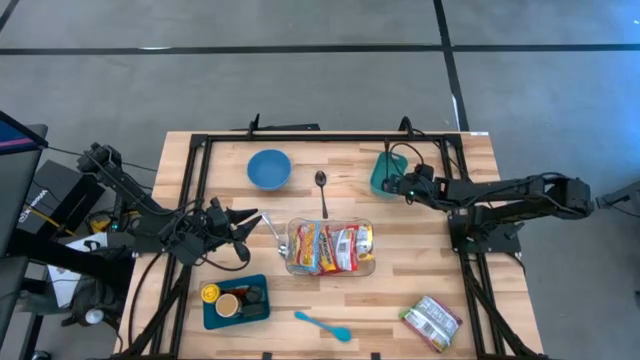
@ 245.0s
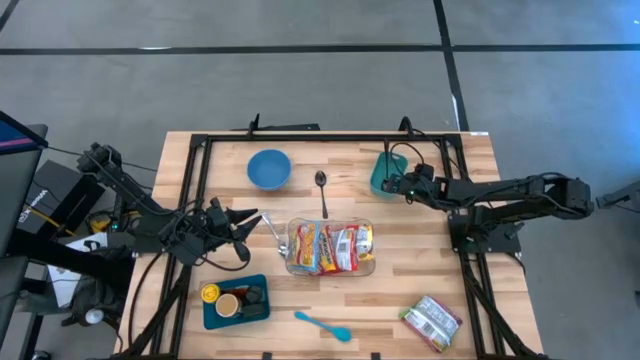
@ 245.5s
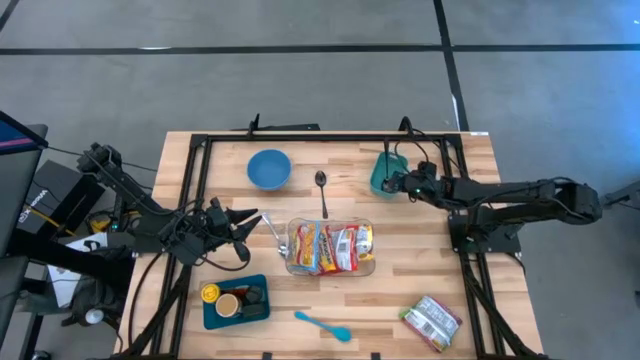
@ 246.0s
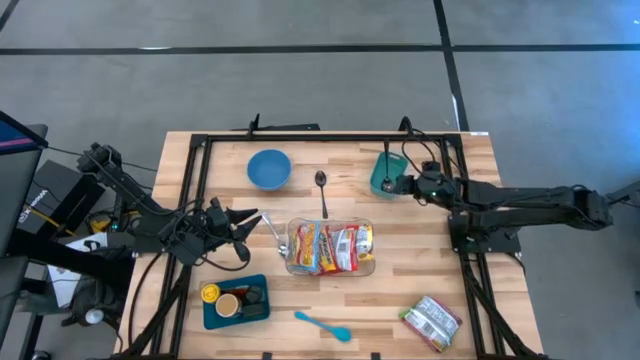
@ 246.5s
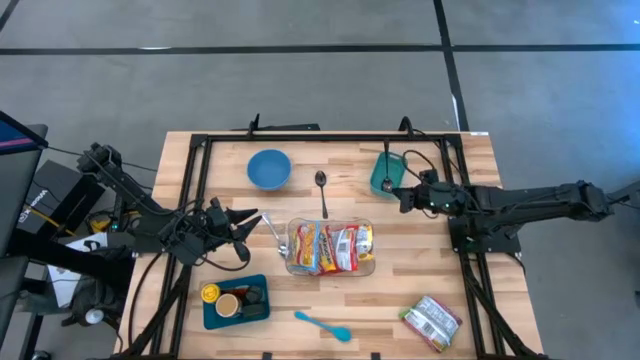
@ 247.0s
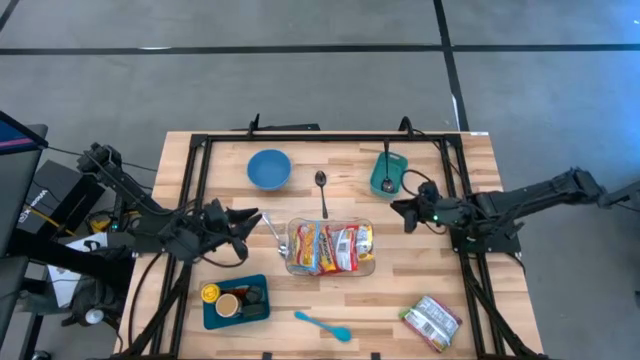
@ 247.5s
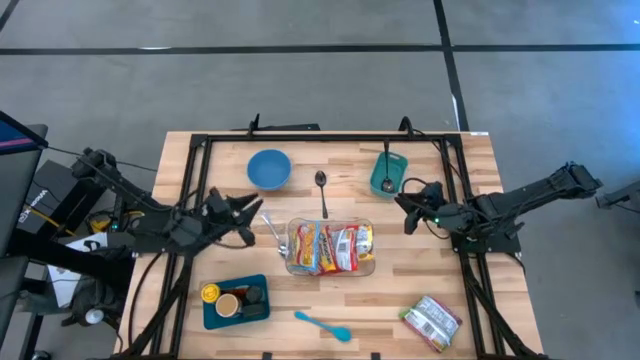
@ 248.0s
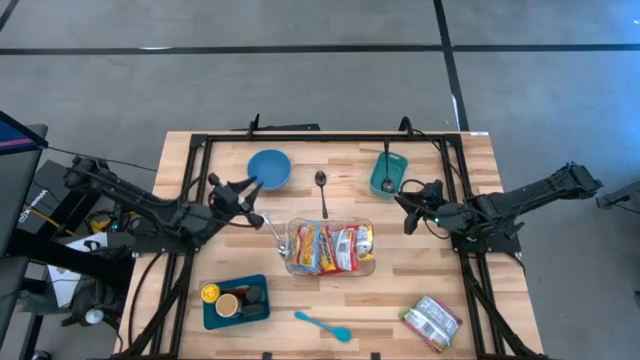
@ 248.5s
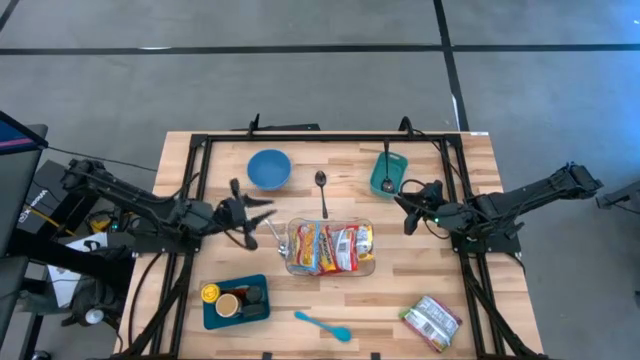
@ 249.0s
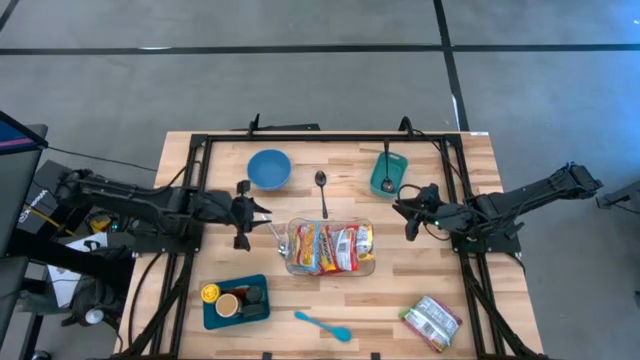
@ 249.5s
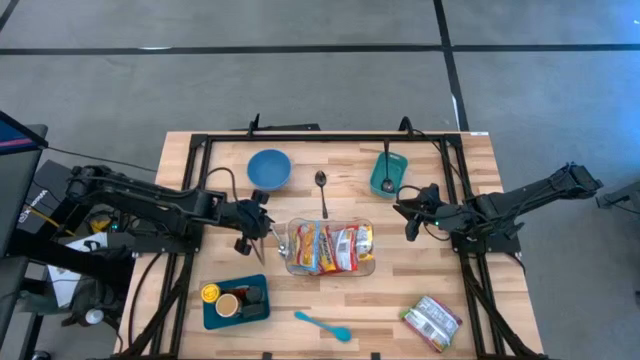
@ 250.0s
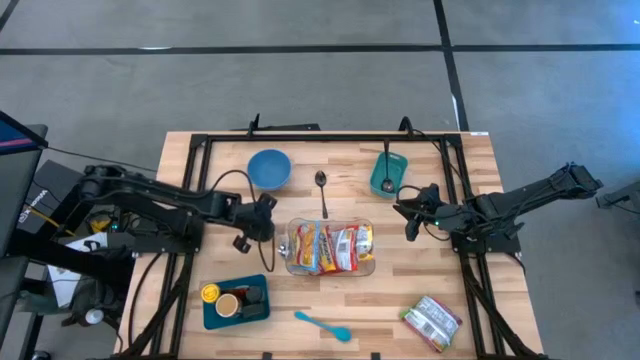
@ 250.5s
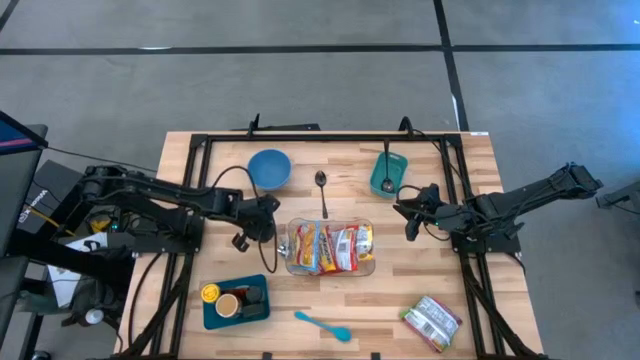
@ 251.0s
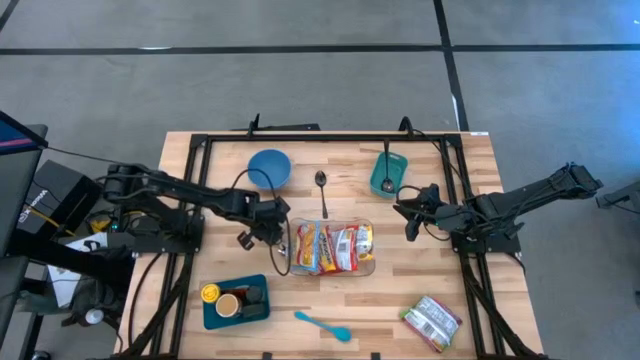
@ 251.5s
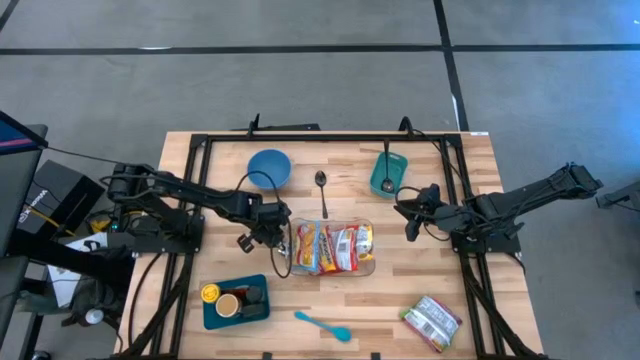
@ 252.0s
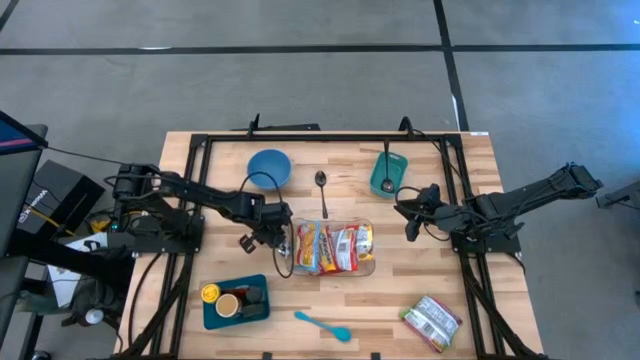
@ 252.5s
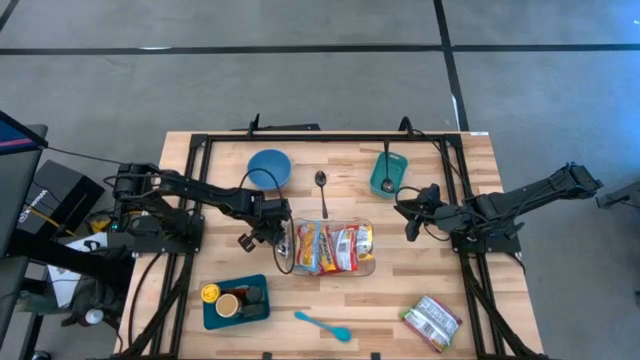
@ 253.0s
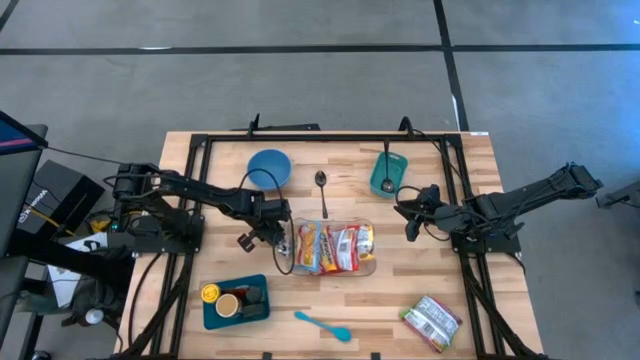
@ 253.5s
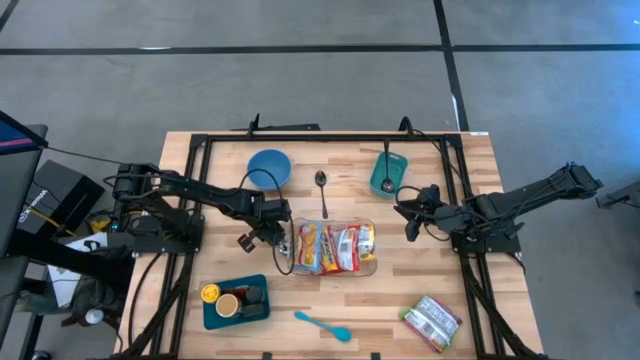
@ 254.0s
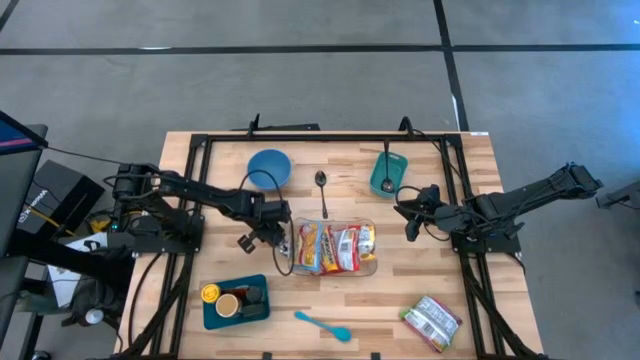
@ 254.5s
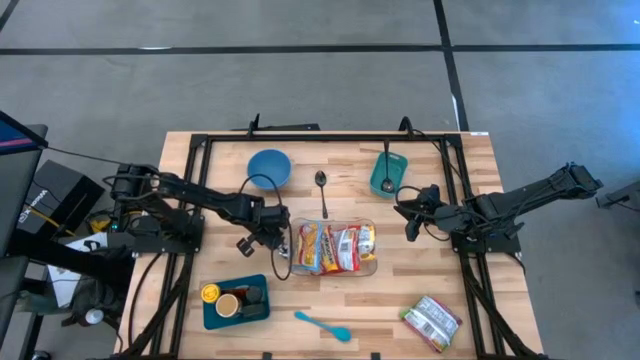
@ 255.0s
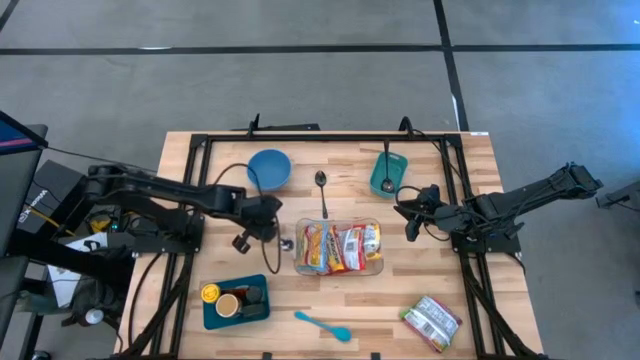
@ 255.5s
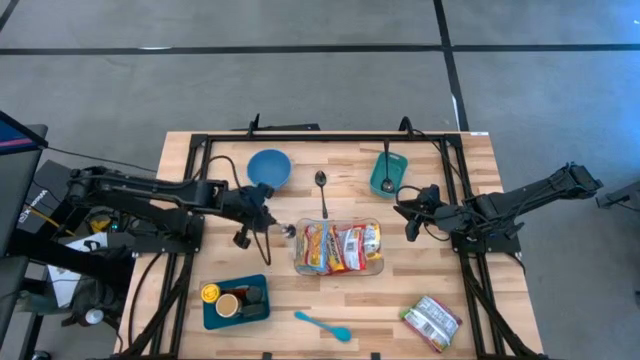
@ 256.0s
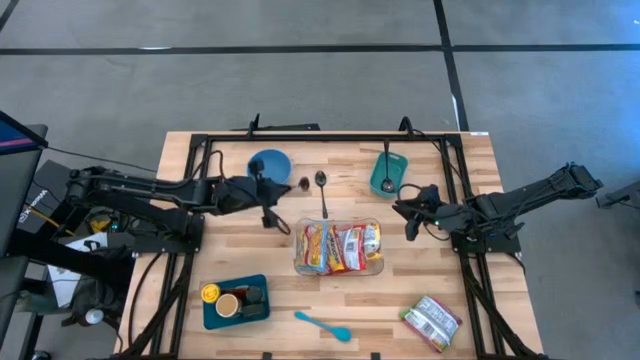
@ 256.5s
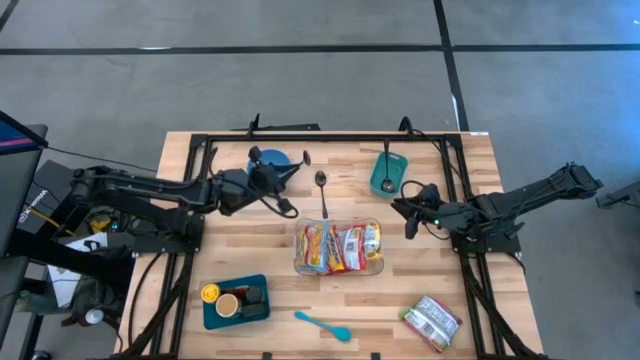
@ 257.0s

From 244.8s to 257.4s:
Task: Pick & Place Food Item
Put the silver spoon into the blue bin

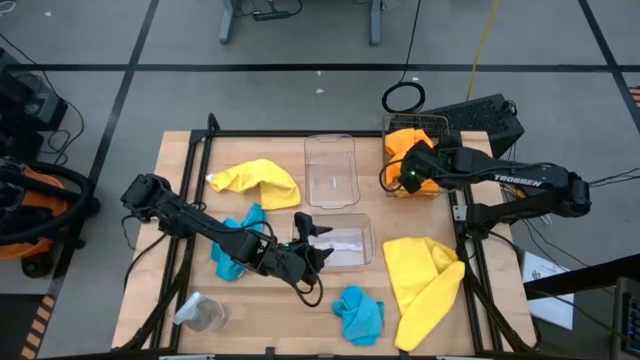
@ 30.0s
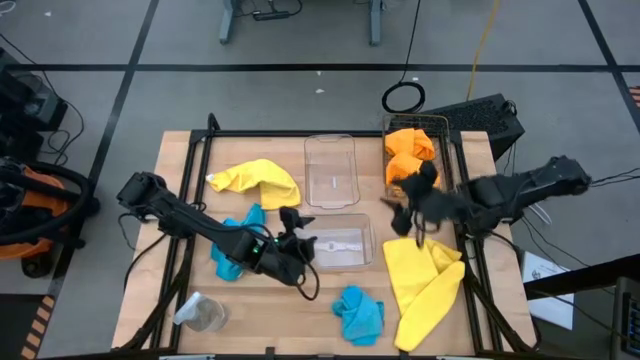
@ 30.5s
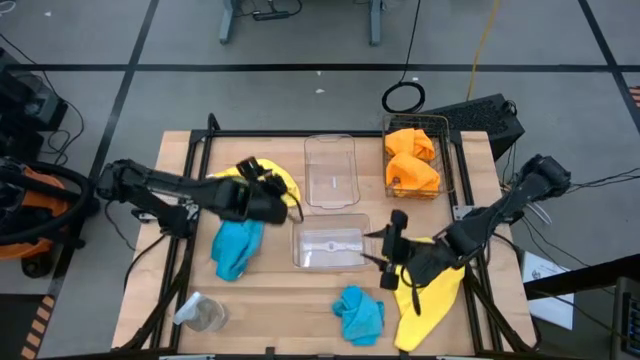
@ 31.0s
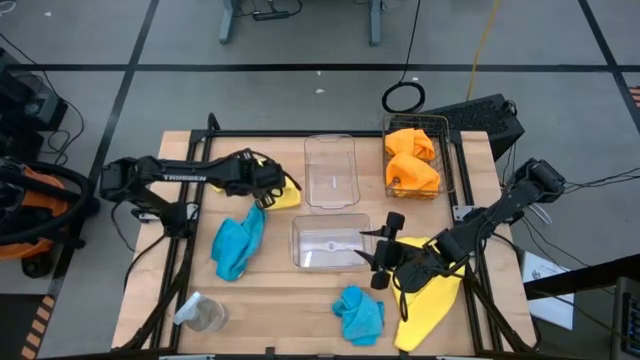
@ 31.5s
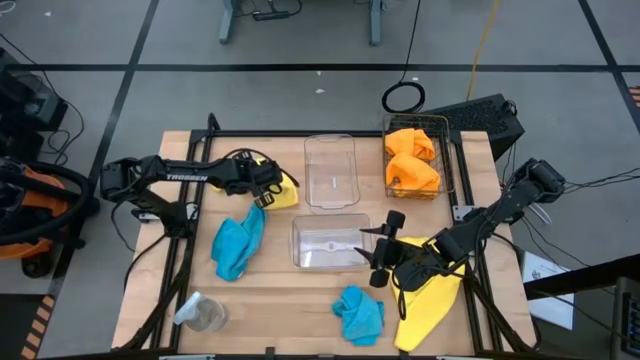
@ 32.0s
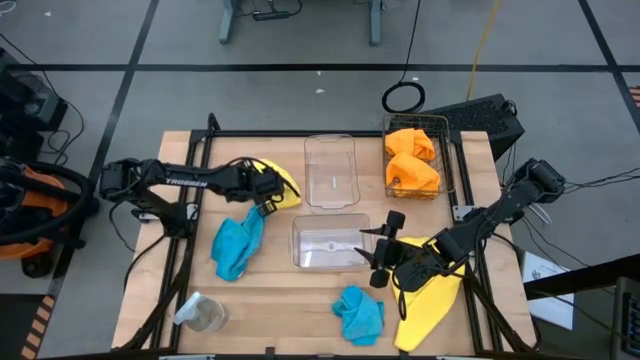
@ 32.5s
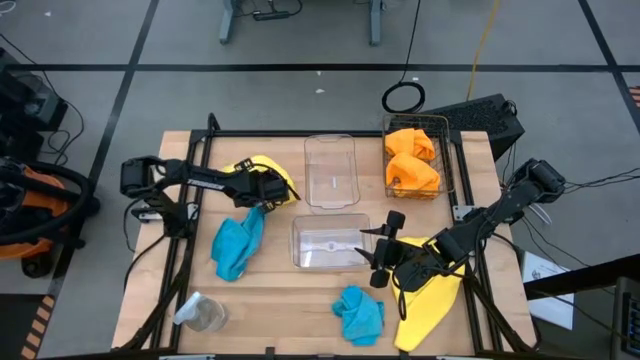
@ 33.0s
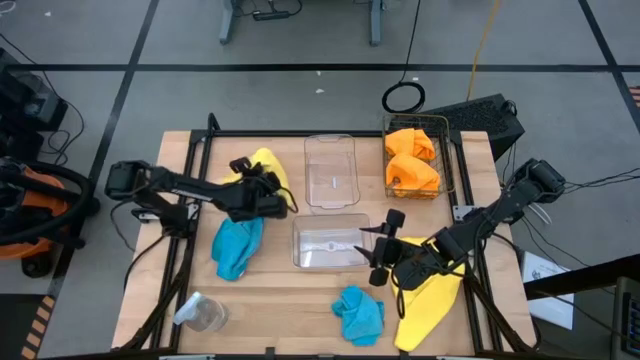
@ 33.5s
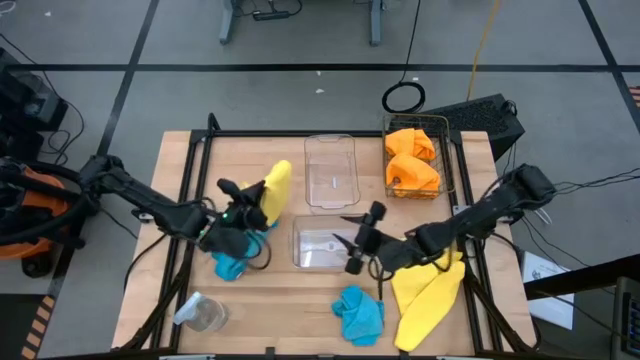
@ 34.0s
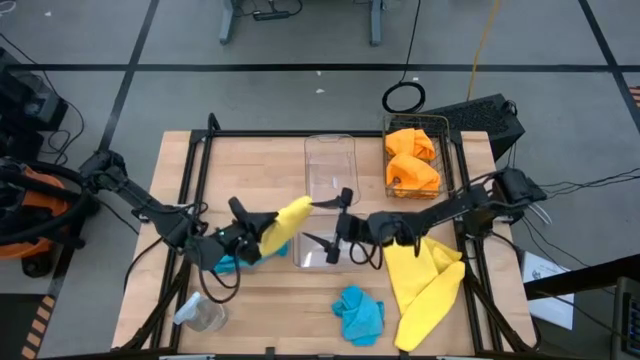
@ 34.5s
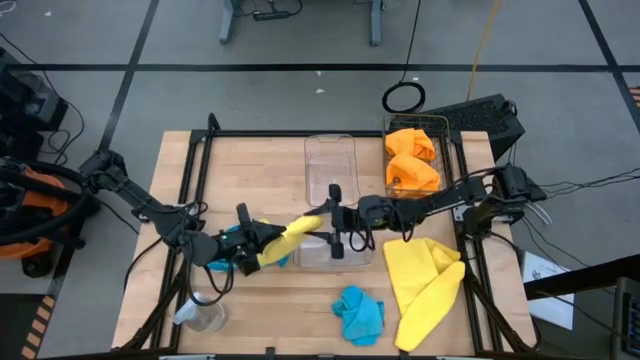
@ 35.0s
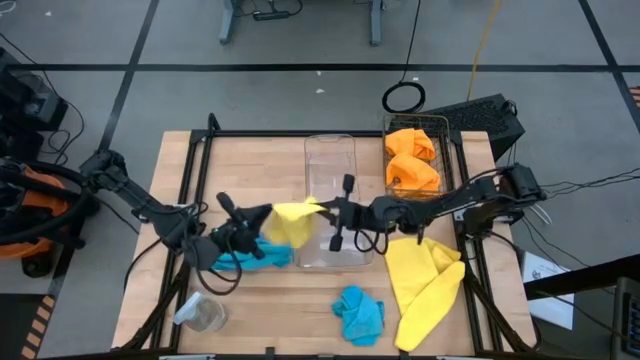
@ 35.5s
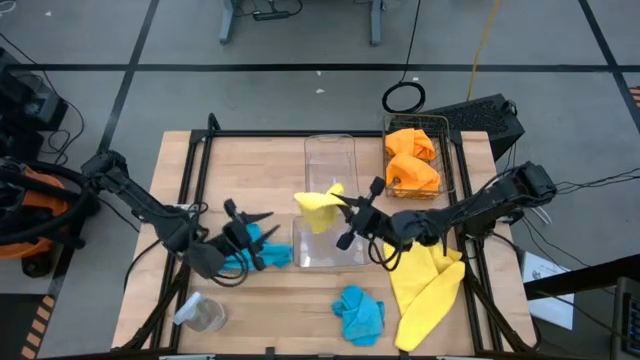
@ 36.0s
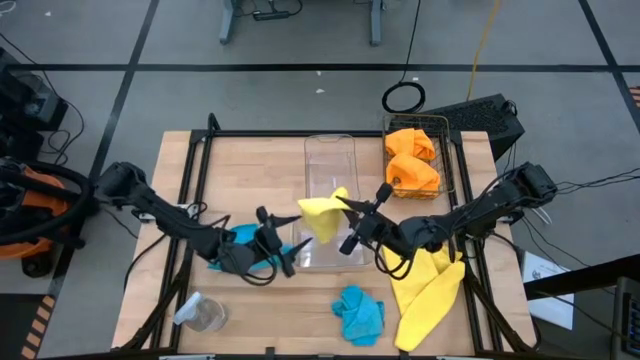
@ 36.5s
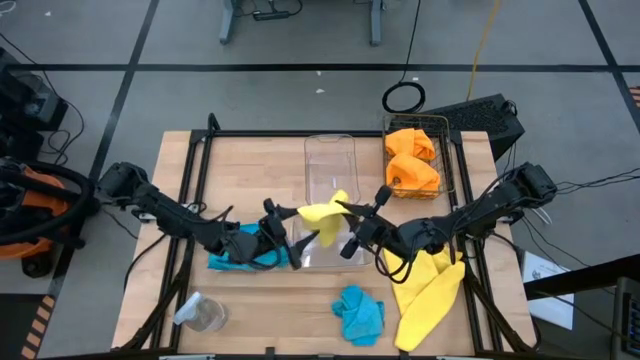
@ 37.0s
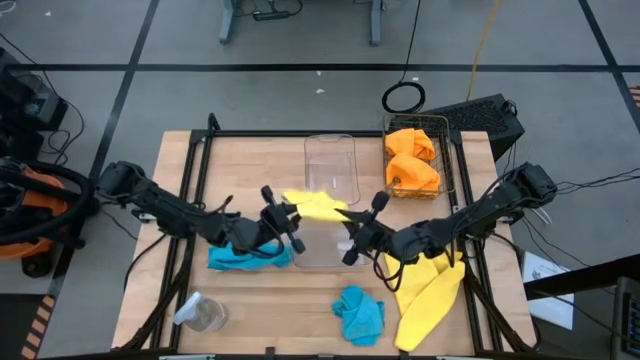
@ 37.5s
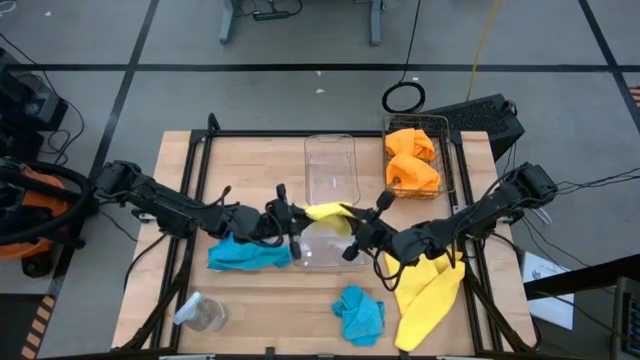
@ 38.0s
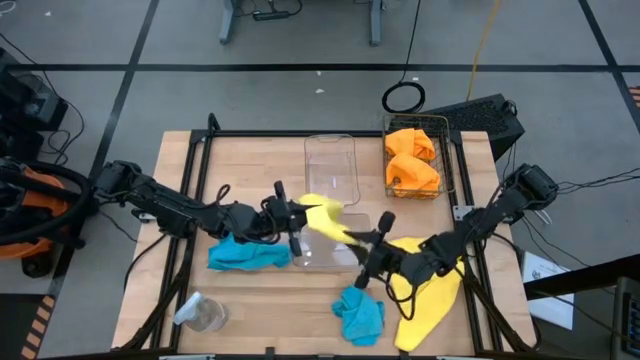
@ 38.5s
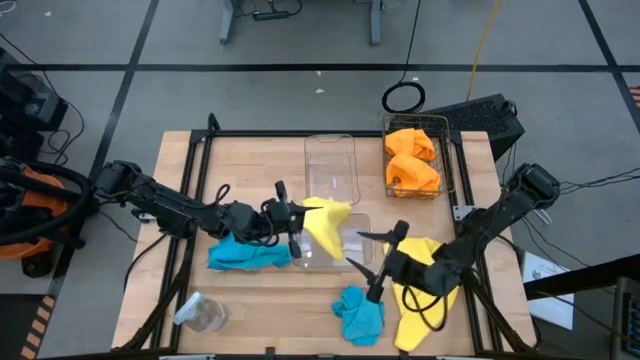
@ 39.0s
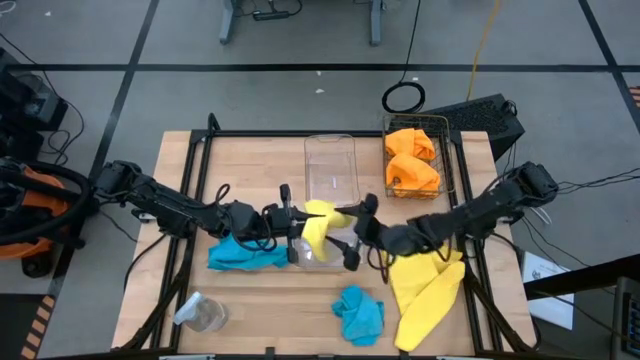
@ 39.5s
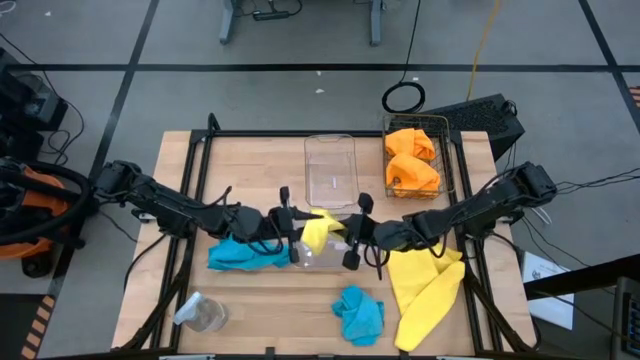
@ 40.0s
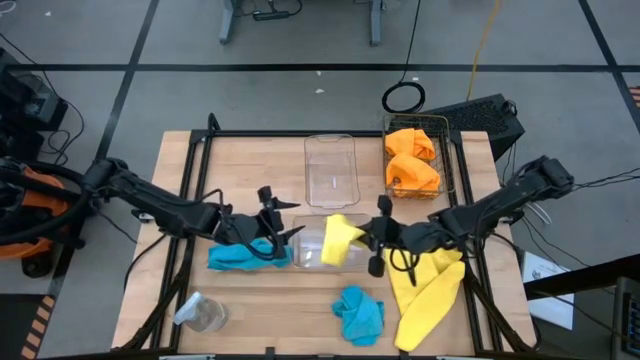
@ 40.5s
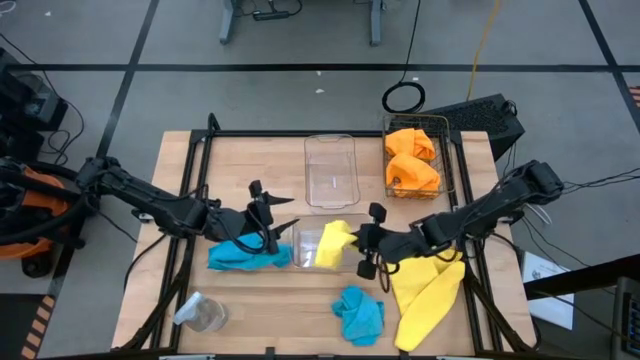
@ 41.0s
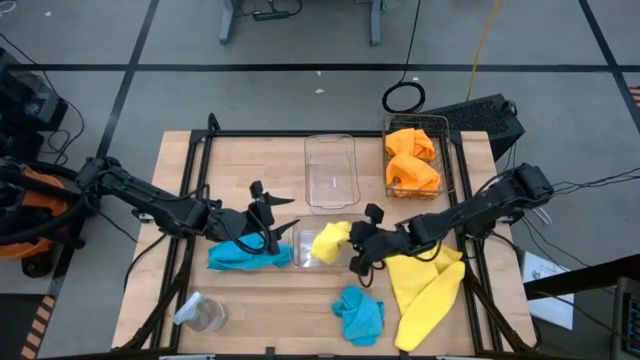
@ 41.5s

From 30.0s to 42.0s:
Task: Sort microfiber towel by color & place in baskets
Put the top yellow microfiber towel into the bottom transparent bin
